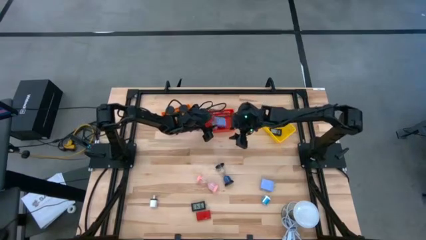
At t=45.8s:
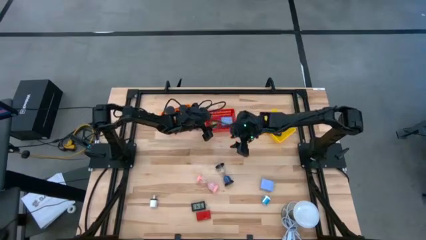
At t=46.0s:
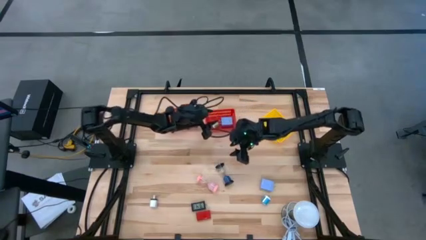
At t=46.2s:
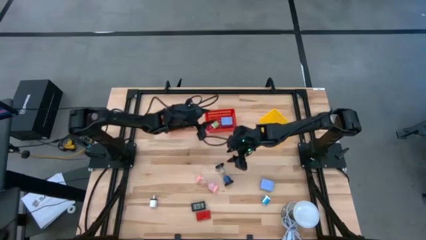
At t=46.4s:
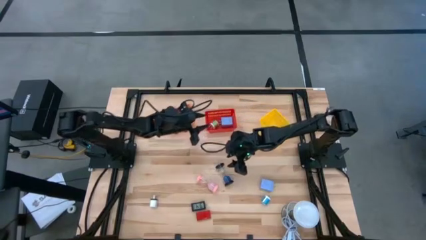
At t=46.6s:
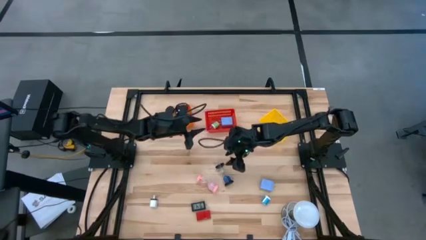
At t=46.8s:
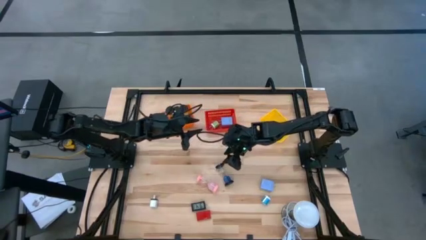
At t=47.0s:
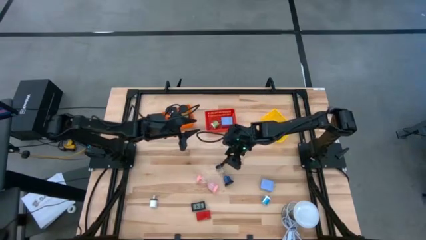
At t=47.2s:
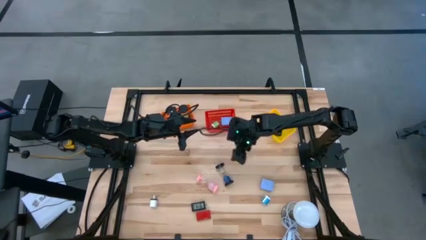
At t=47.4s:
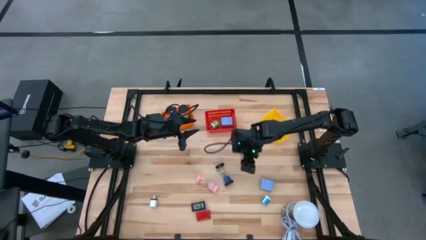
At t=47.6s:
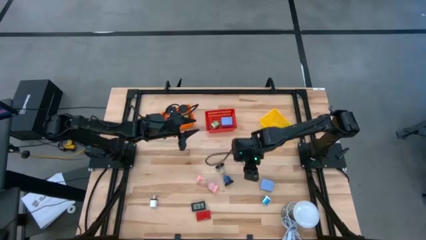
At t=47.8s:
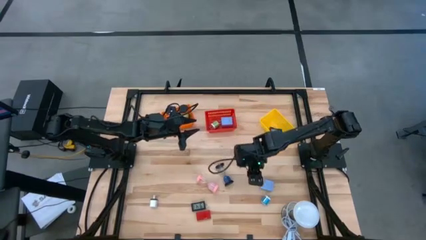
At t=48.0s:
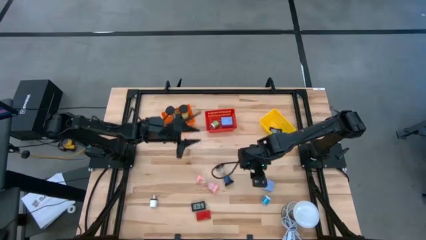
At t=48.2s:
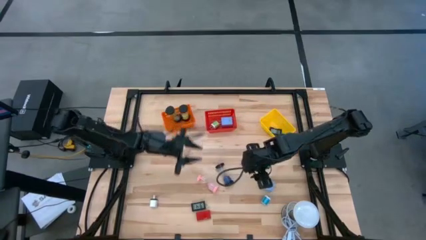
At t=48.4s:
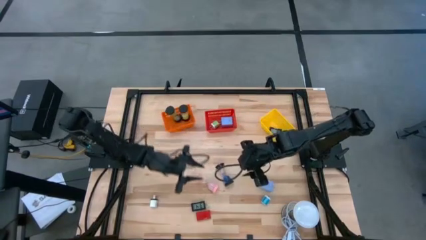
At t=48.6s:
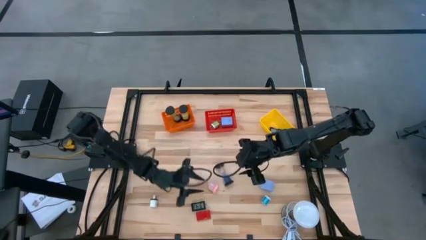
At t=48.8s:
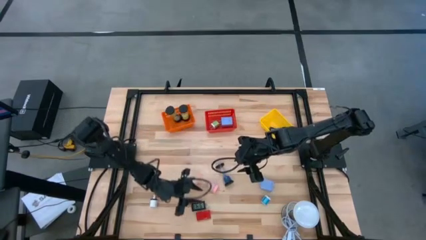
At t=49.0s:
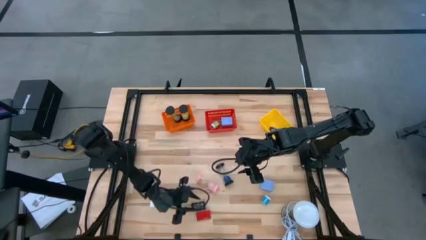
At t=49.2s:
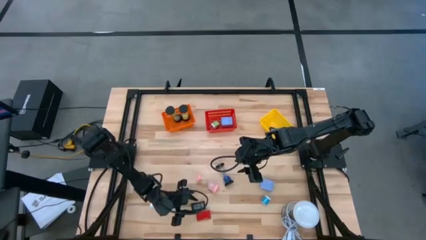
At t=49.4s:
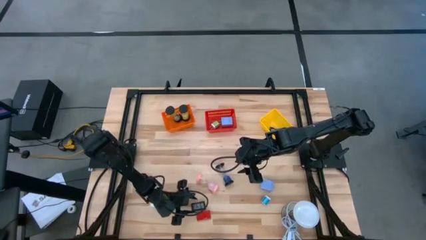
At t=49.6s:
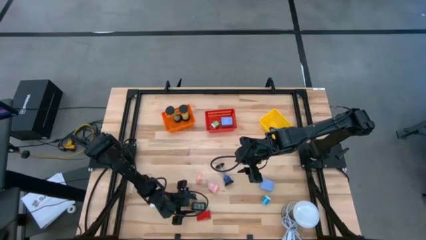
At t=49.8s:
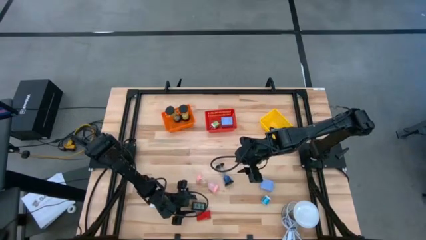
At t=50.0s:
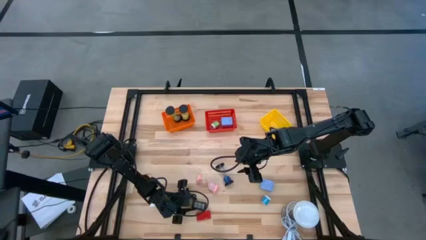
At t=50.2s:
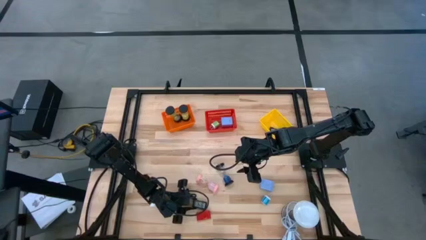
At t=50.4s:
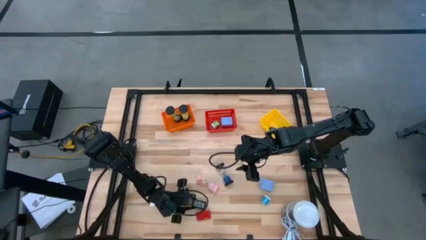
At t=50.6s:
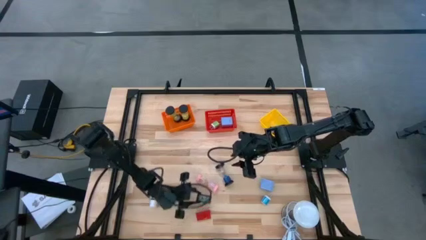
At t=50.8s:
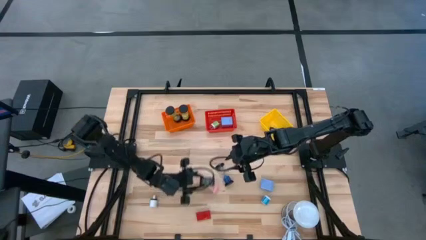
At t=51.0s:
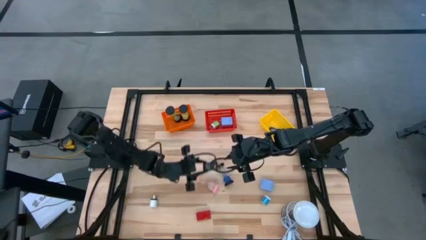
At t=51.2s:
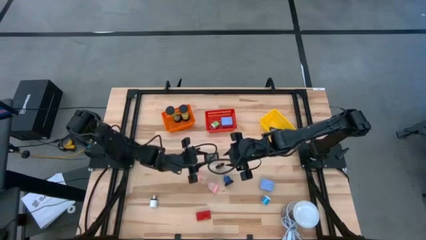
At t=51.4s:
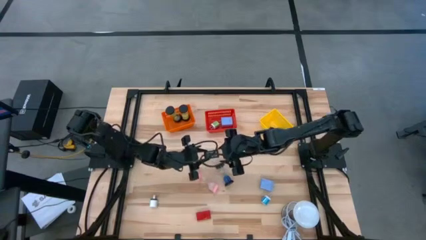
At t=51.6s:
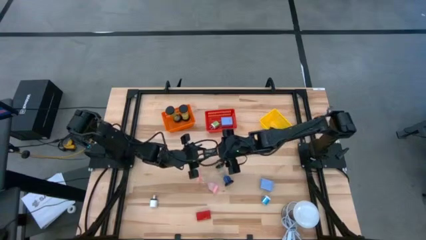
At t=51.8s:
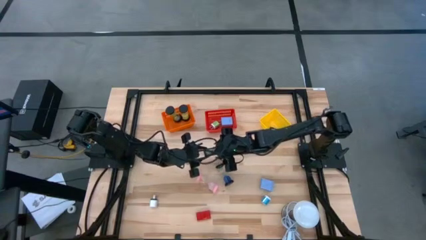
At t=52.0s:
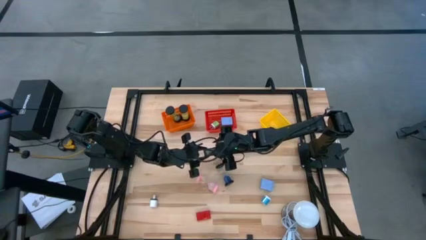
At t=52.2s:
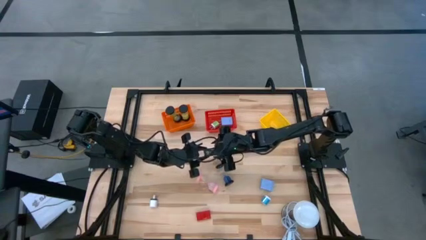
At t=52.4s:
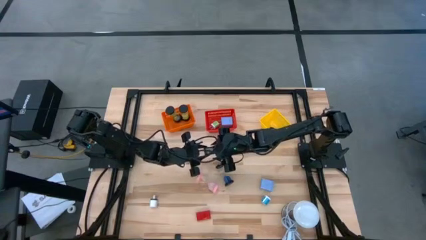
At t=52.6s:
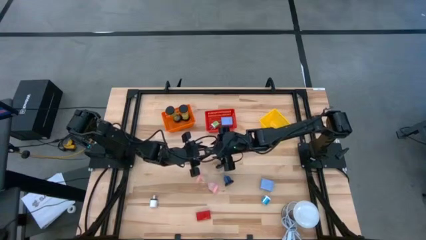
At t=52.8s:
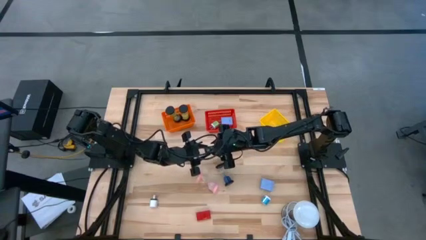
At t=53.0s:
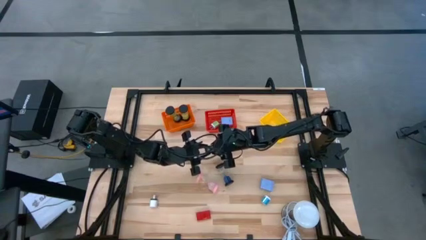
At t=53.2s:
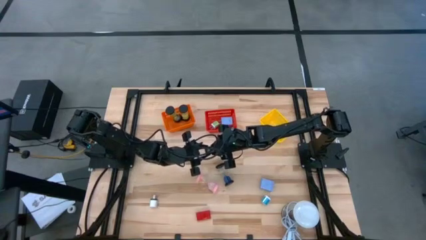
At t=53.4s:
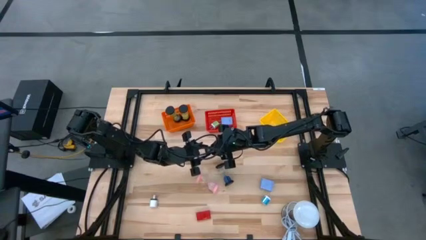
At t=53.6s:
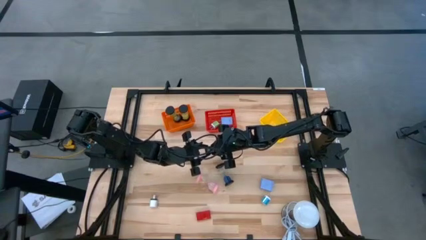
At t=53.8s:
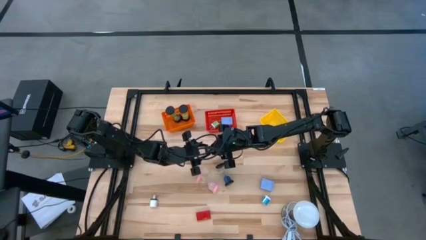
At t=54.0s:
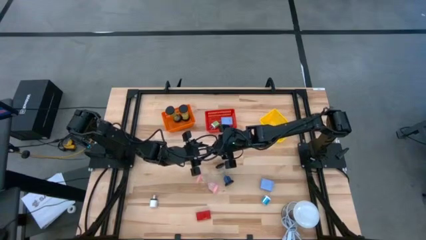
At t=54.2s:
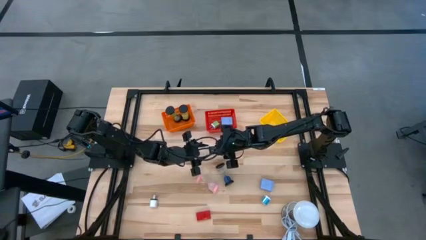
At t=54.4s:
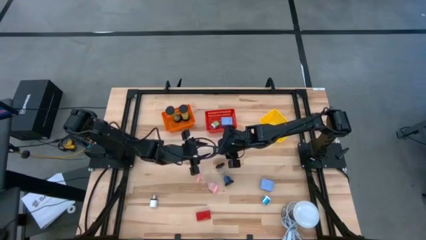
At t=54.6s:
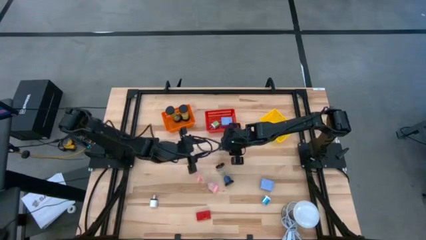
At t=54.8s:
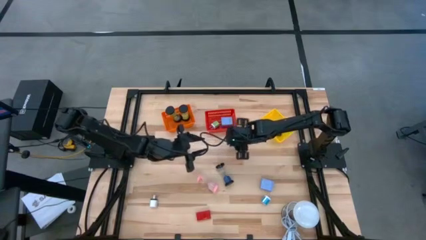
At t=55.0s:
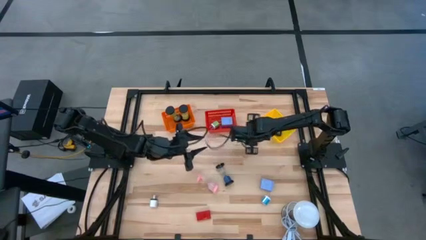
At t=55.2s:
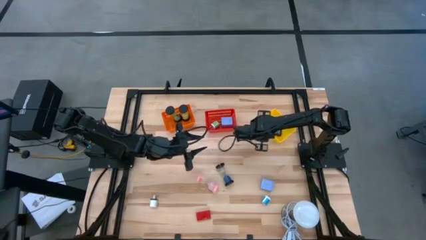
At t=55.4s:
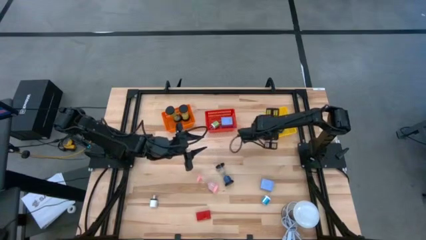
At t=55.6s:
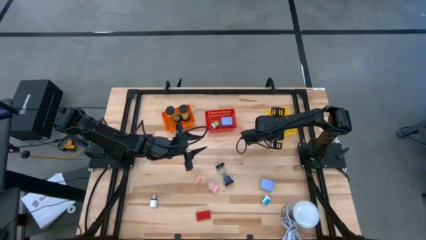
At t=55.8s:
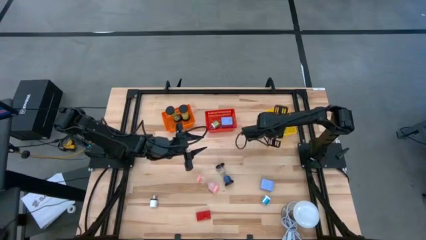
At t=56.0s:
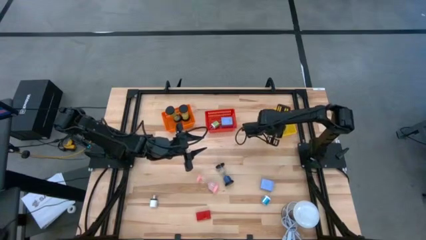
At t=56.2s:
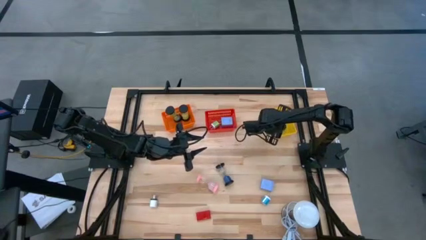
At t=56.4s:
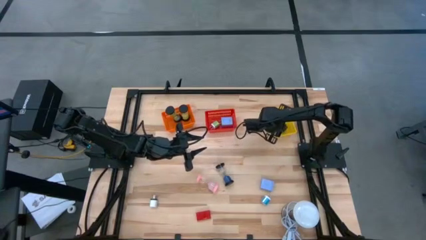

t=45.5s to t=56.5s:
Task: Pick & Place Office items
Put the black digital clock into the yellow bin

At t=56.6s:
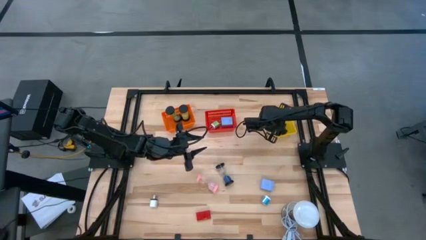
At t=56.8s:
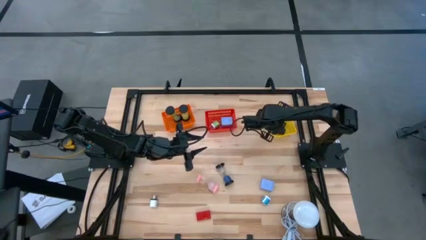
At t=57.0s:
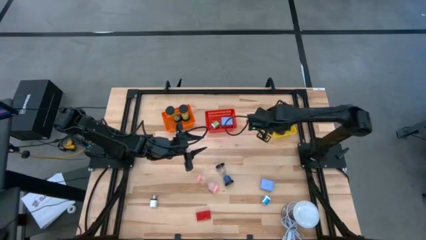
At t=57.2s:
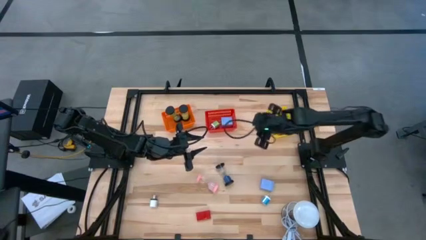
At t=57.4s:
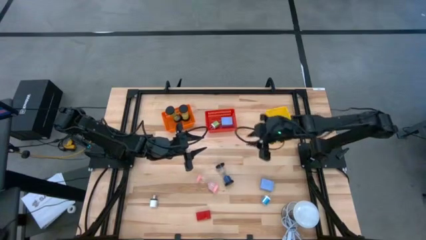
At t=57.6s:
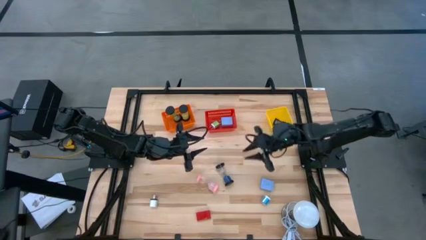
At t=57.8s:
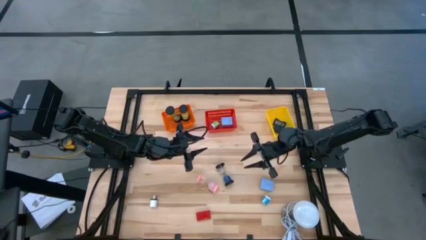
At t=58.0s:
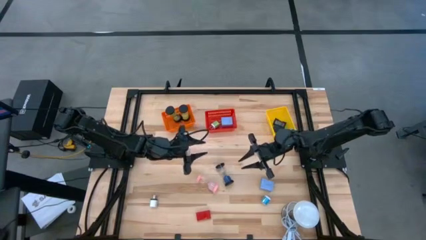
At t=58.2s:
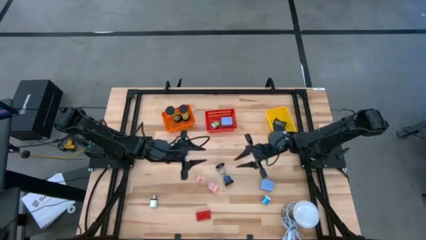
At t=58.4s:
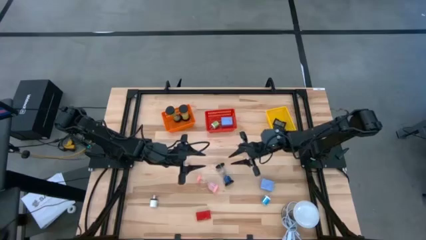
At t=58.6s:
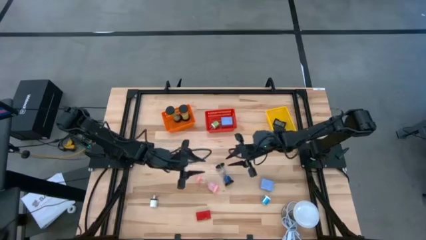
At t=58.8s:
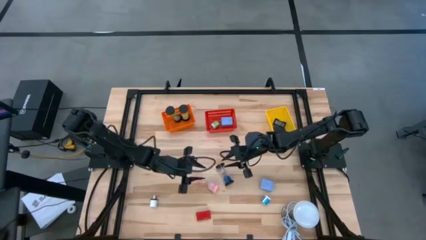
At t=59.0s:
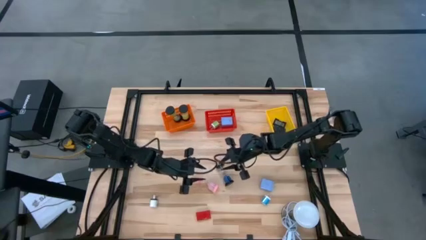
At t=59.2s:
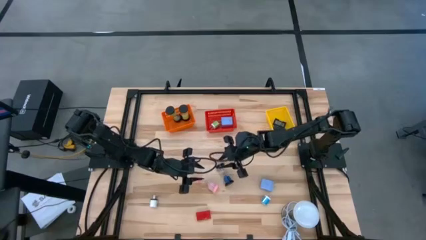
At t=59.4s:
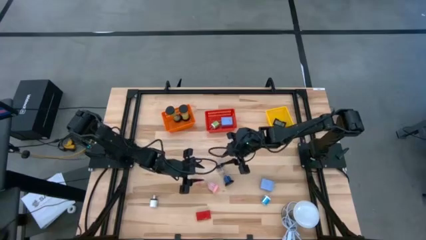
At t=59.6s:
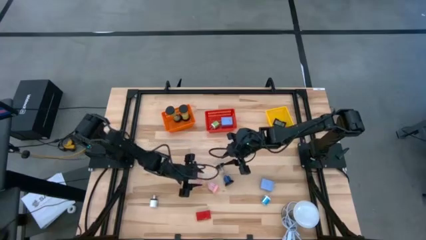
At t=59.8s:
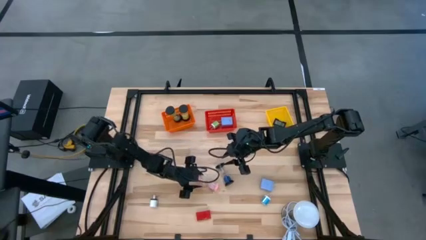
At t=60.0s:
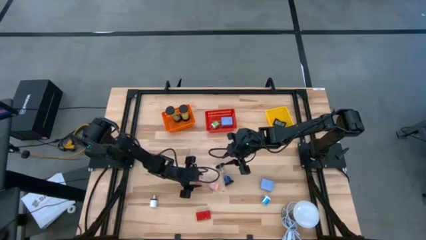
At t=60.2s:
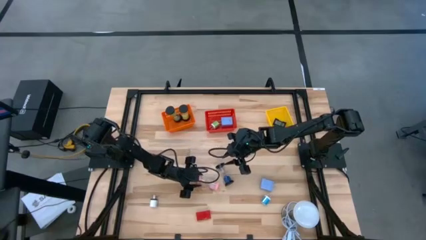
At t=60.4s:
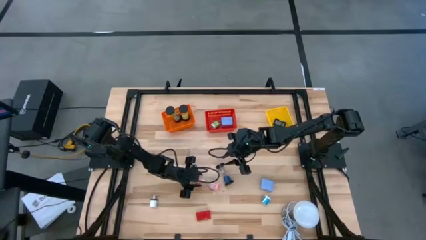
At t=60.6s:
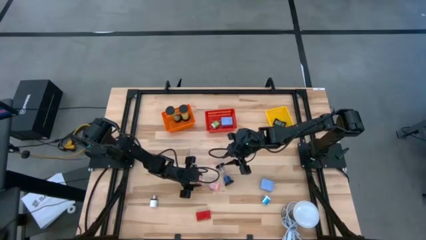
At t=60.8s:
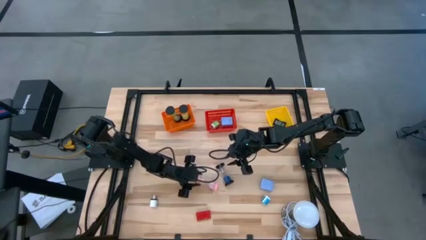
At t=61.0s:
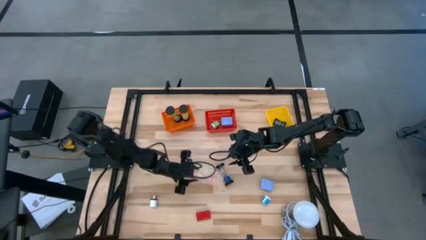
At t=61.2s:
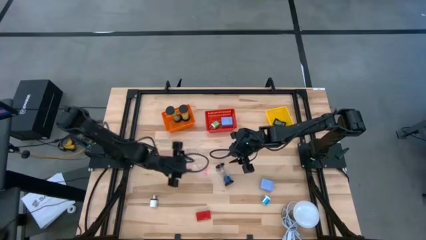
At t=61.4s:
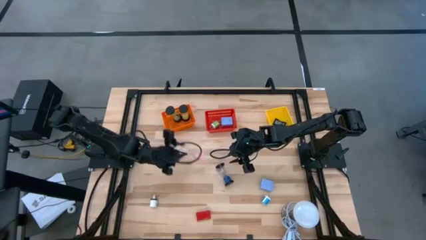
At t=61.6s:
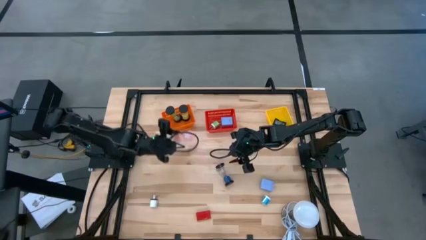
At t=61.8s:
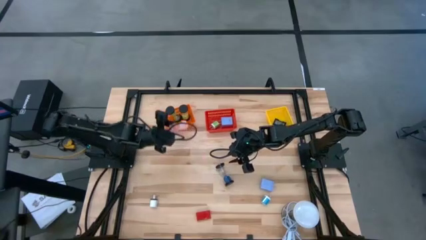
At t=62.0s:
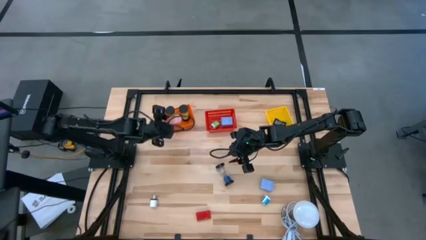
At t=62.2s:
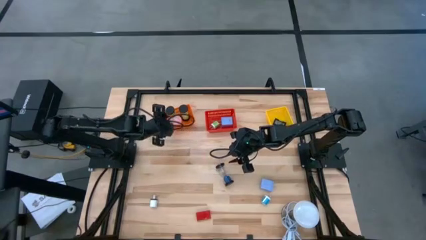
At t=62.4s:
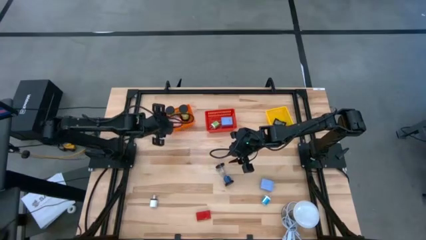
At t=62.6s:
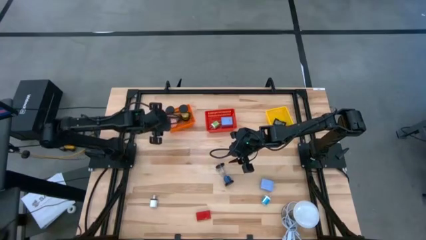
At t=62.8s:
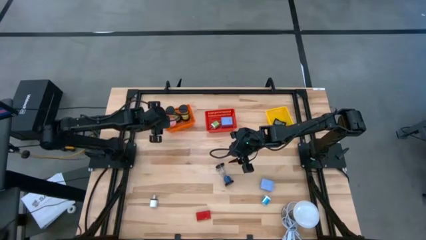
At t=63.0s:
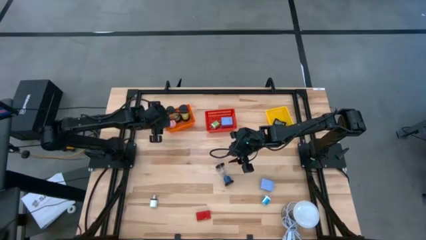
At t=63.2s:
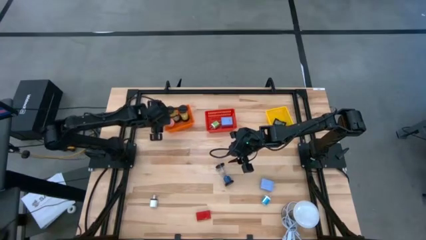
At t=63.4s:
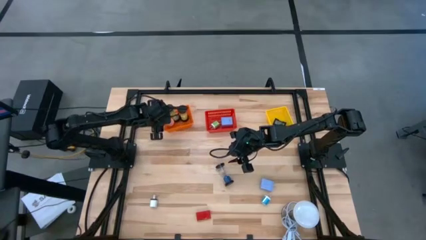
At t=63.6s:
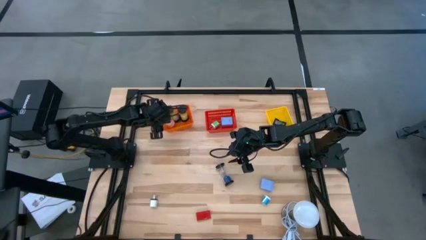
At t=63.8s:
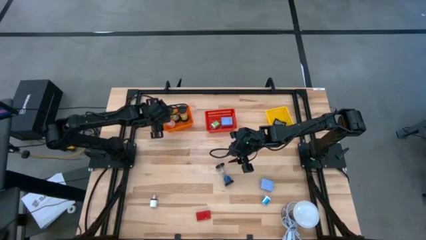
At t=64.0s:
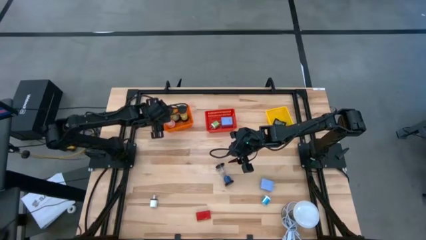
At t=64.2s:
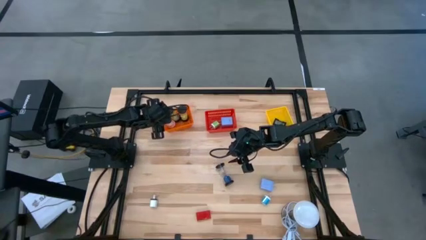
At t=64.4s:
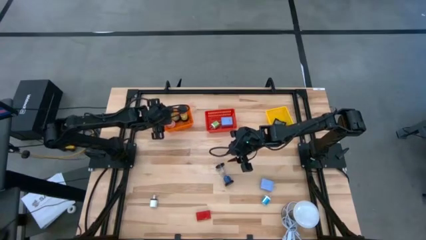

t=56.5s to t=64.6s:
Put the pink hourglass into the orange bin
